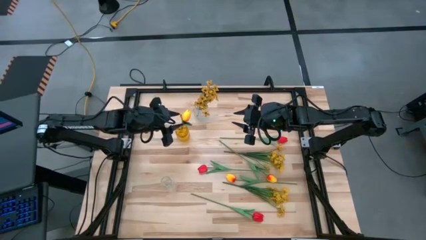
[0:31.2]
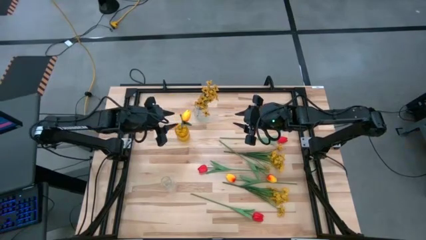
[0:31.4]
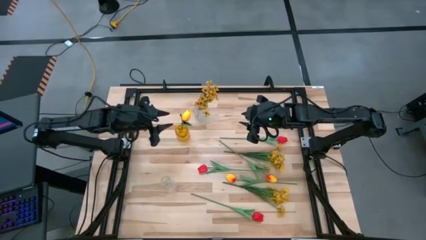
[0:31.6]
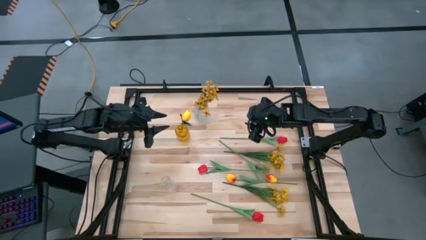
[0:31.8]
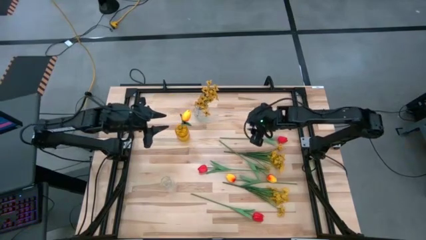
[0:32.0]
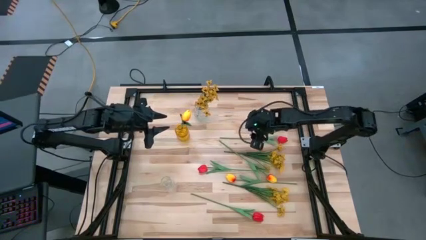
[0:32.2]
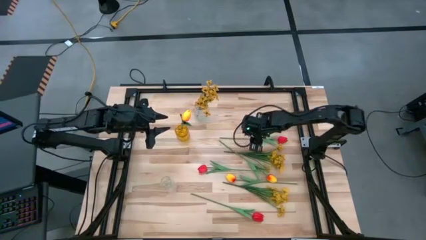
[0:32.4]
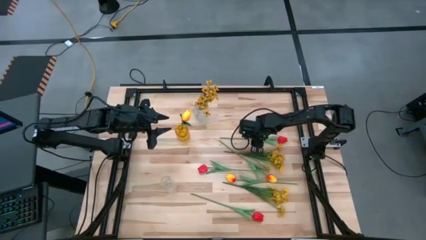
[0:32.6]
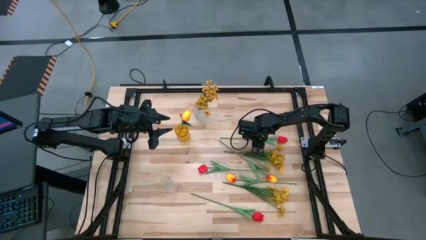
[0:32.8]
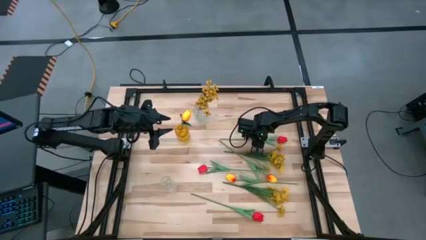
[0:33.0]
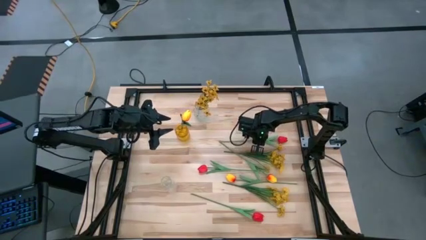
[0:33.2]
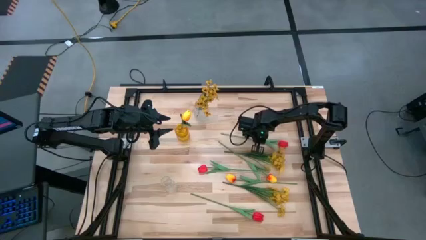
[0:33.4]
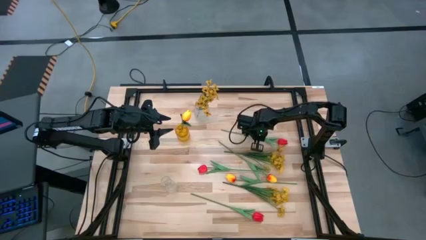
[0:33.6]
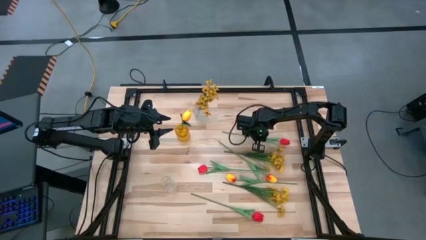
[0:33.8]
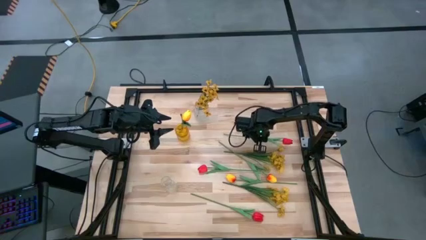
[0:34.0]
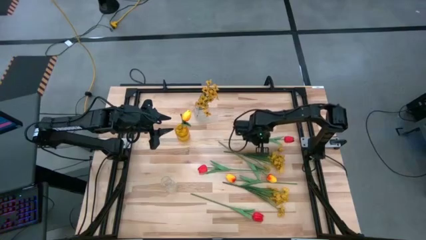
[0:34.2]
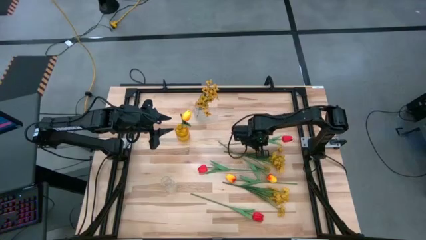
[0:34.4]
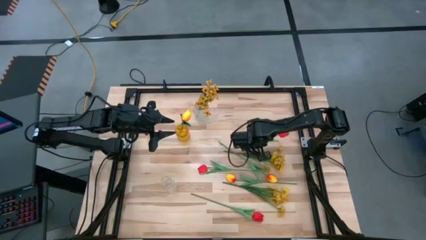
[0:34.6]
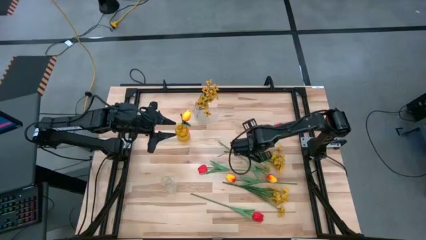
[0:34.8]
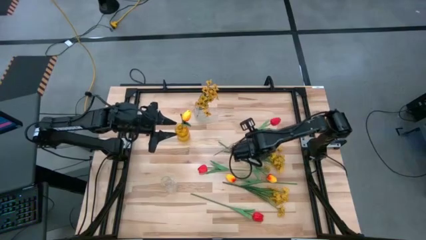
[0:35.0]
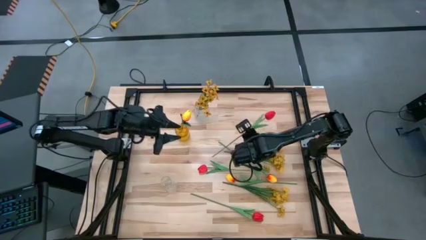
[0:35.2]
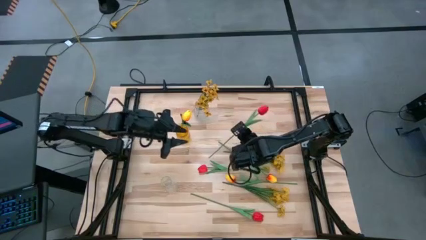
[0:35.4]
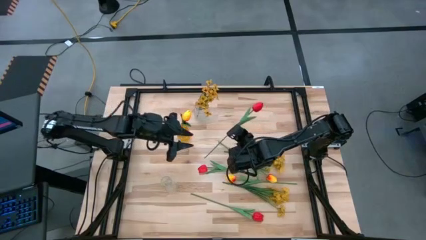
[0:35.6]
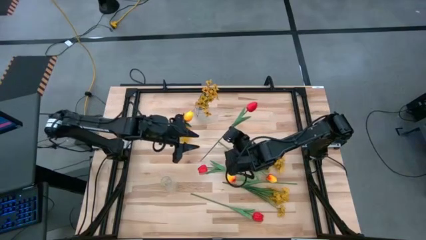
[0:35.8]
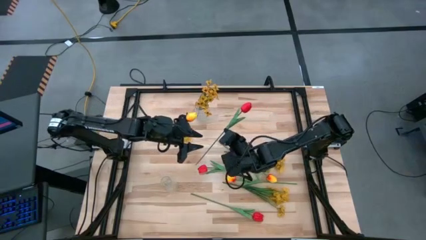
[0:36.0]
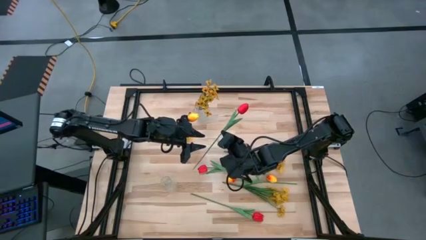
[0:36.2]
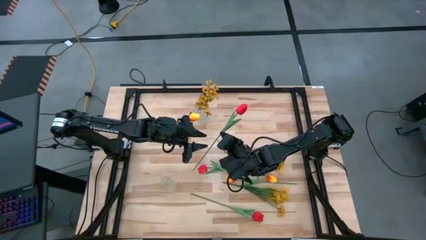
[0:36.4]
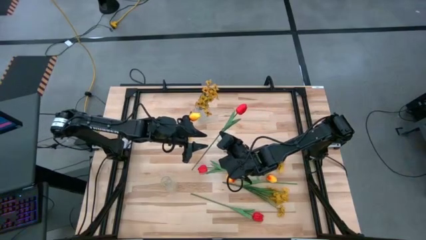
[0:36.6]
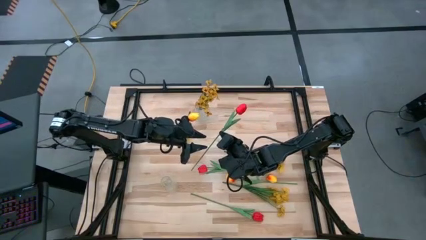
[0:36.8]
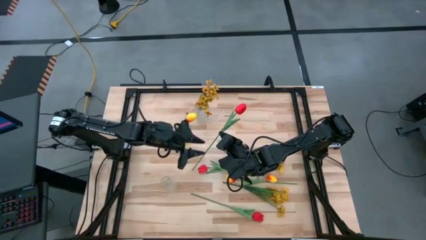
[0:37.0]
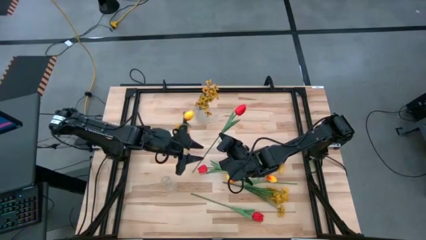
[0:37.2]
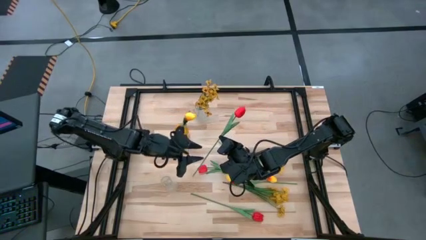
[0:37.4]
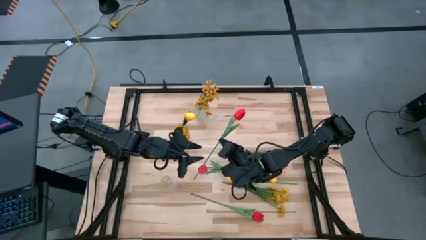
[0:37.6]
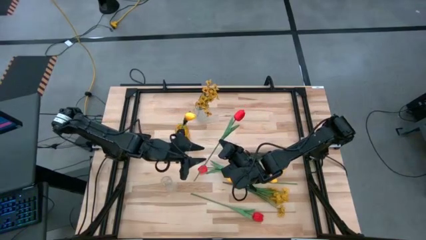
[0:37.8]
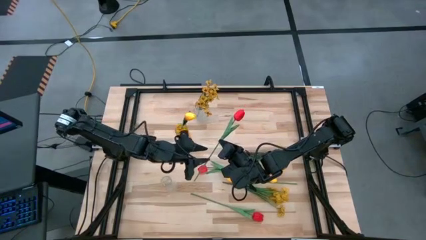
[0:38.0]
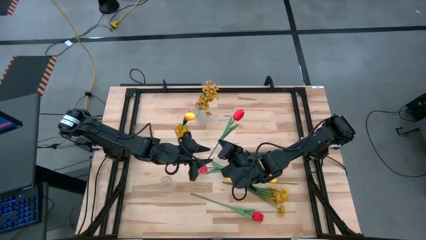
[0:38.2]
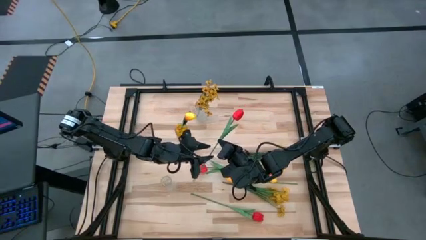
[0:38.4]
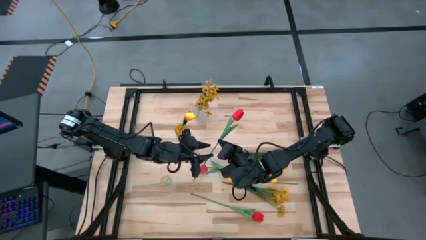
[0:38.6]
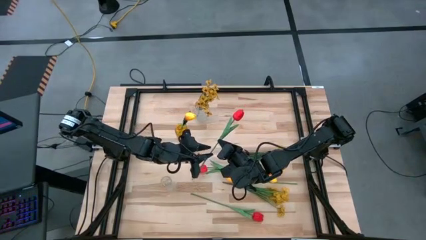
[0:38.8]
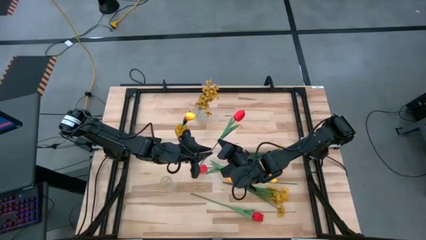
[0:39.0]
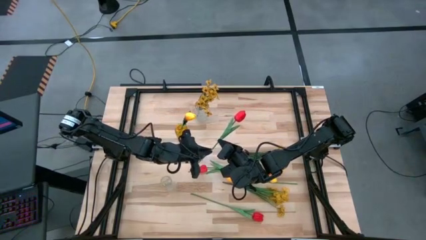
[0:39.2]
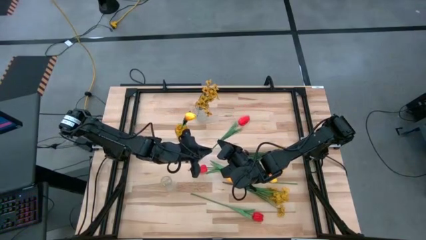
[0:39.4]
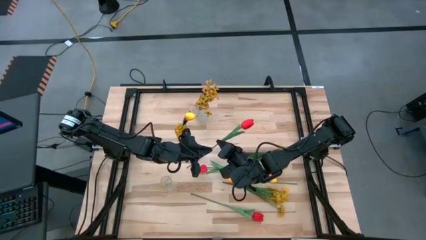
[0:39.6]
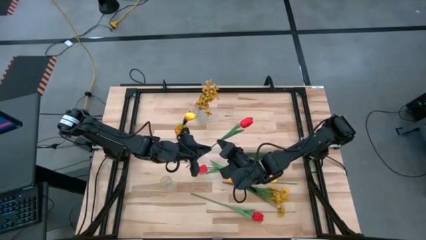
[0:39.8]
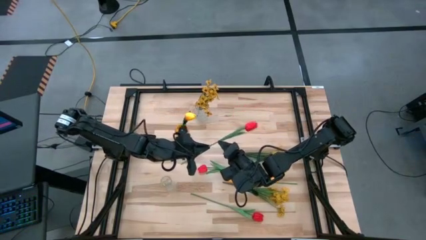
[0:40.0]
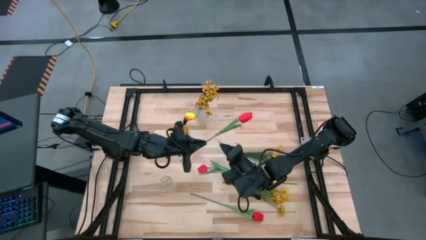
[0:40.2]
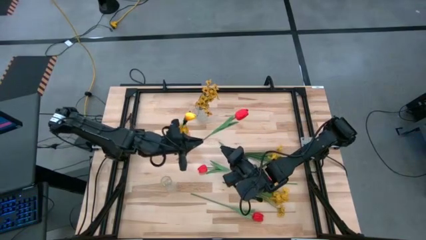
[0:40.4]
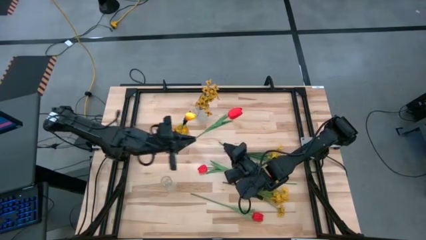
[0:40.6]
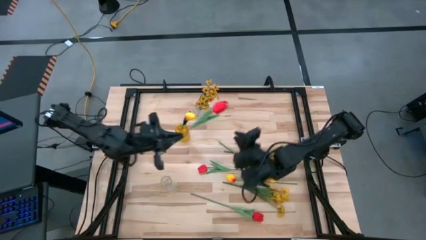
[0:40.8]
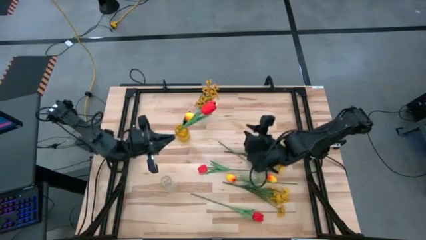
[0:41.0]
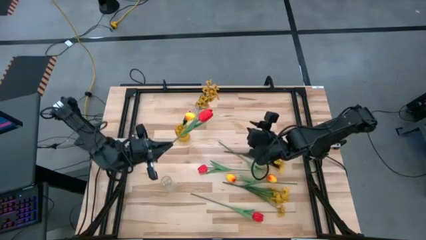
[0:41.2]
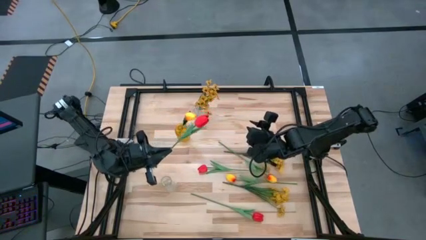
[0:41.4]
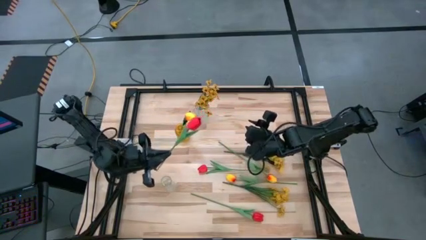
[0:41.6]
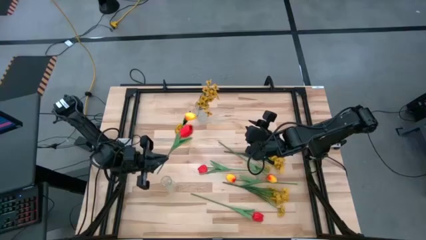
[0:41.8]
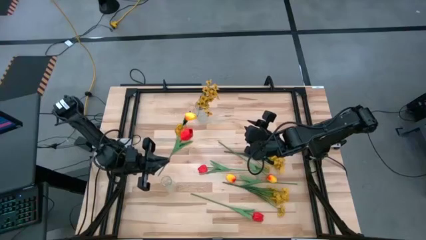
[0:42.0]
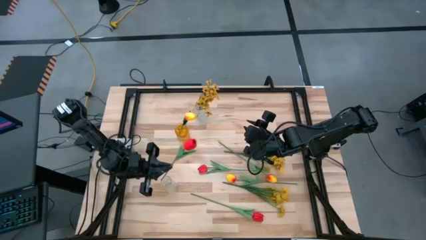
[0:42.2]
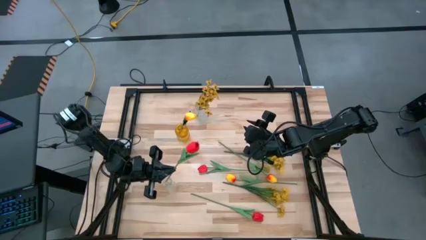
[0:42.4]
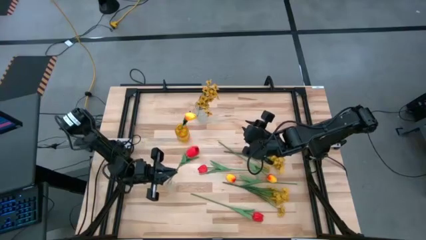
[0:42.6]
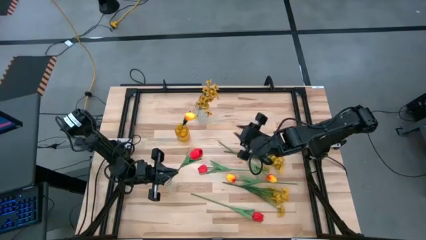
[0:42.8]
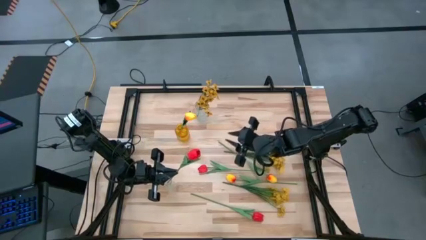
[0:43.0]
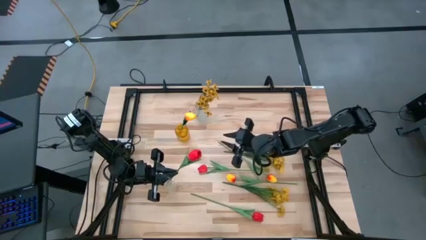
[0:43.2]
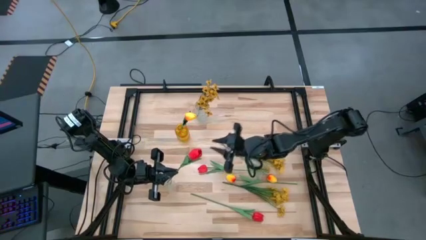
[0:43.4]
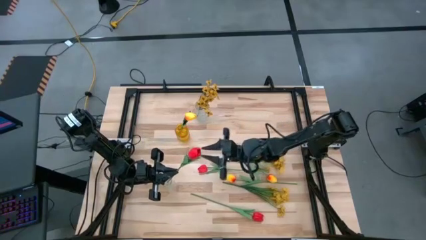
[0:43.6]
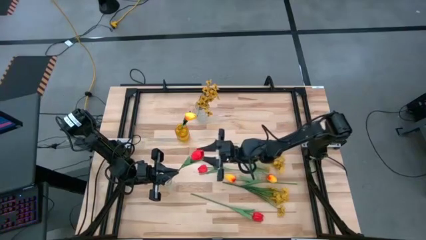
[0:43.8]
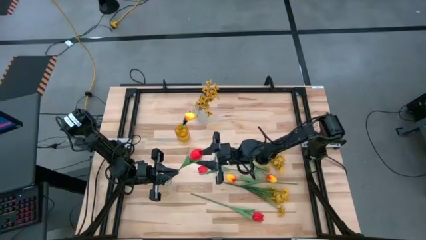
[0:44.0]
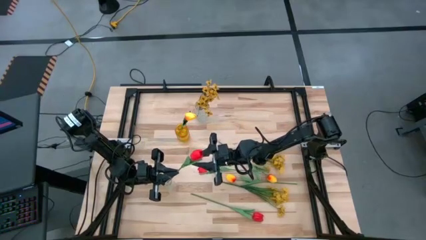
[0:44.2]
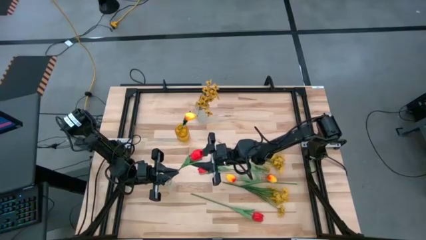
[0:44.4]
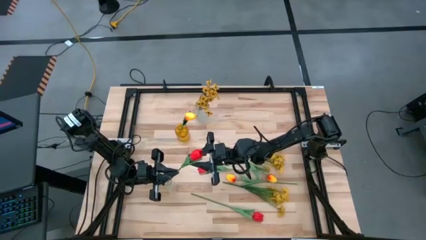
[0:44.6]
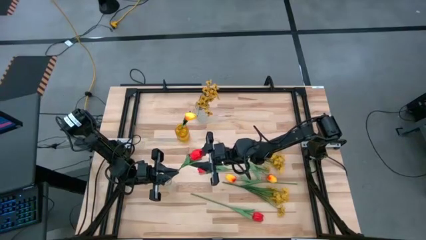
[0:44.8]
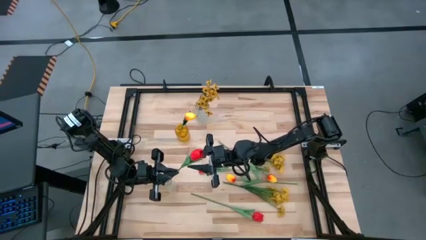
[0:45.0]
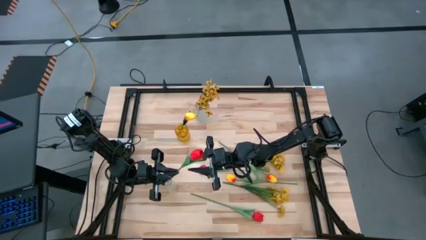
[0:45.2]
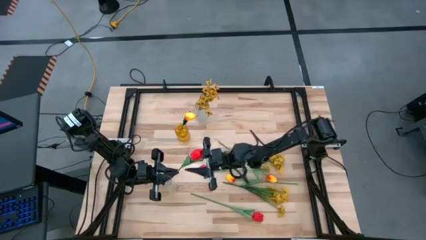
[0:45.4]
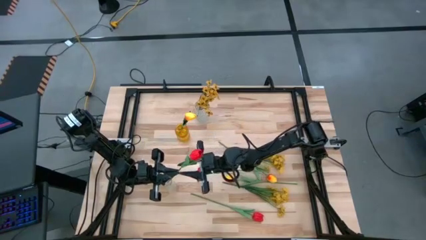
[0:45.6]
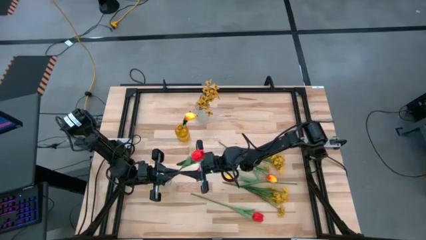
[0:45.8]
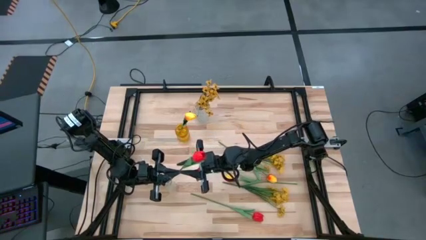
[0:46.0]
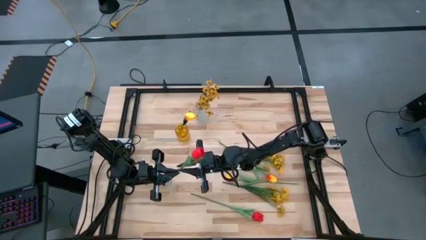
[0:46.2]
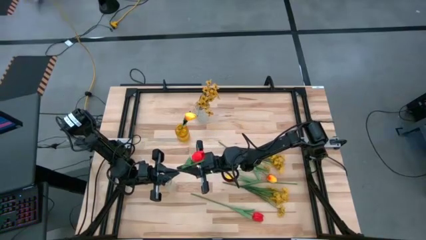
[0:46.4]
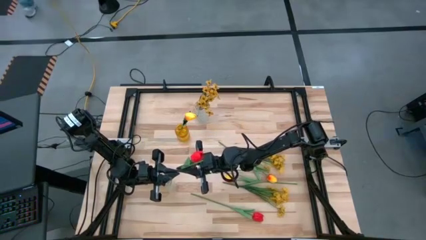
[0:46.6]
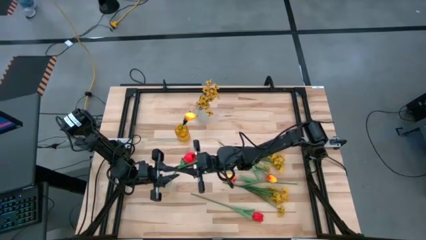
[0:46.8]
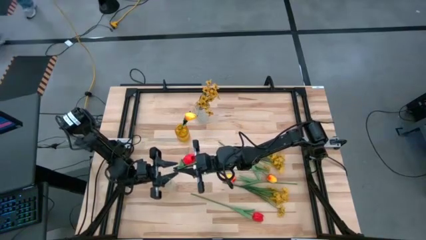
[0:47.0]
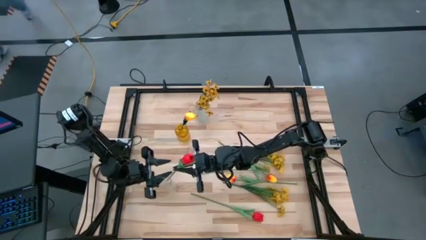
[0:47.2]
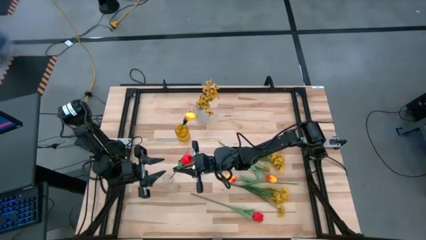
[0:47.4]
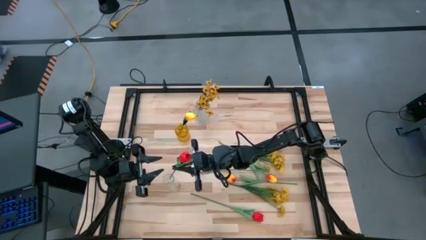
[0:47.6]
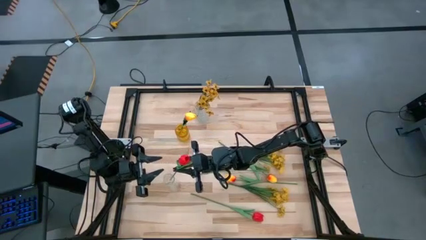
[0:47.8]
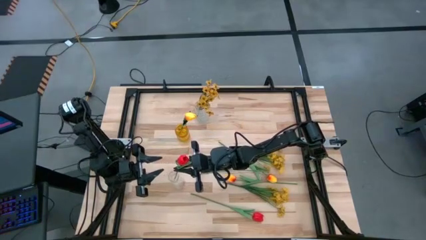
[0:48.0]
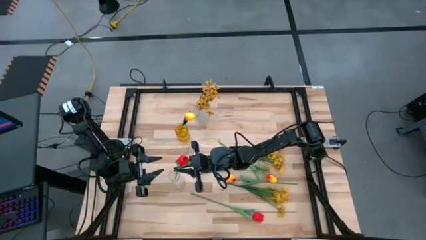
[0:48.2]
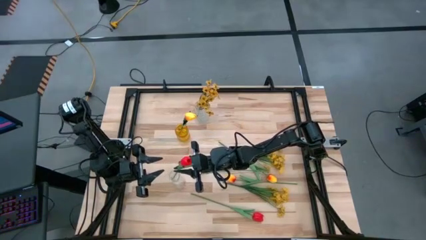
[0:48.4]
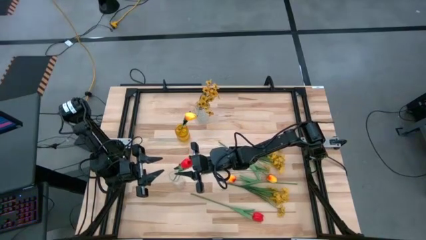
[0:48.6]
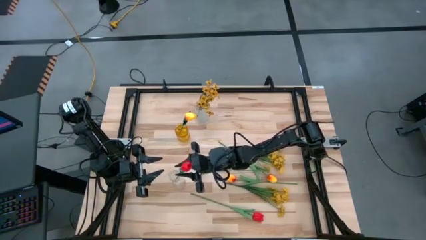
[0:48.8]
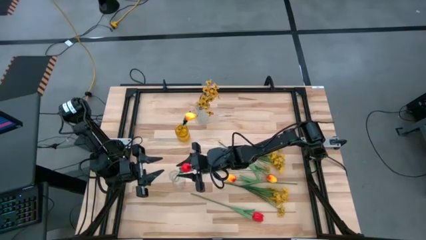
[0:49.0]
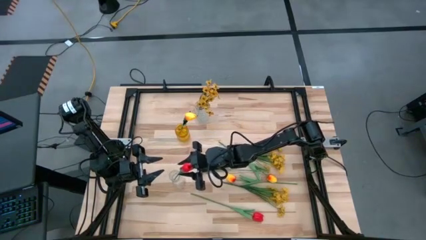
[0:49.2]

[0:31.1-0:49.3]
Task: Sort flowers into vase by color
Put the top red tulip into the bottom transparent vase
